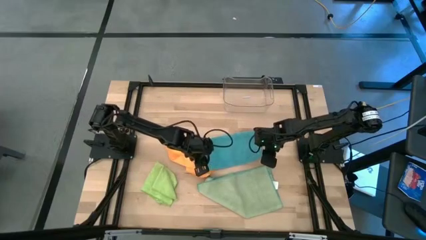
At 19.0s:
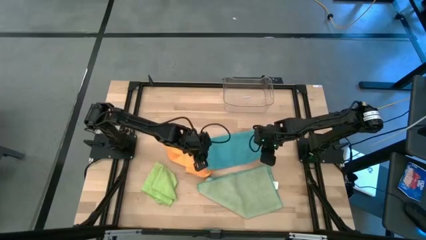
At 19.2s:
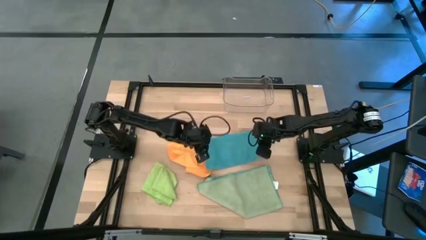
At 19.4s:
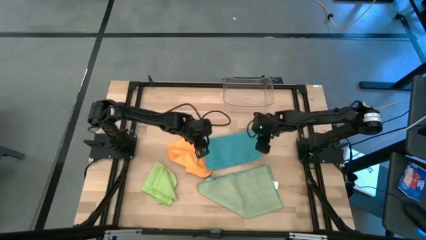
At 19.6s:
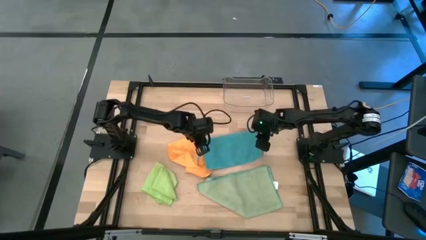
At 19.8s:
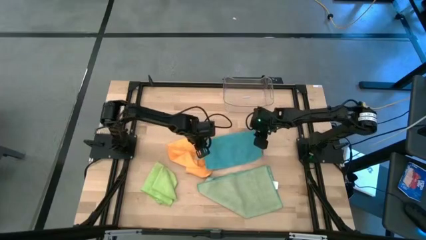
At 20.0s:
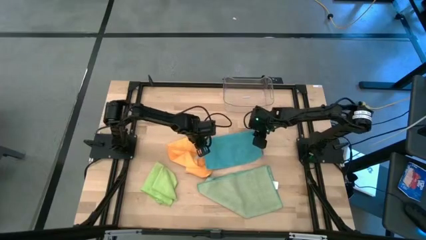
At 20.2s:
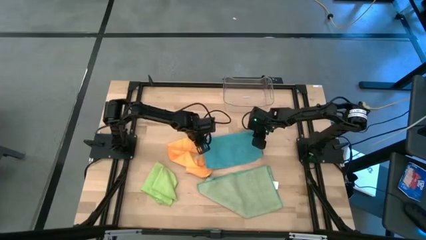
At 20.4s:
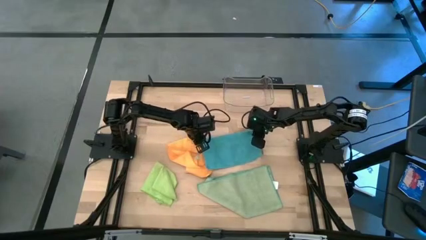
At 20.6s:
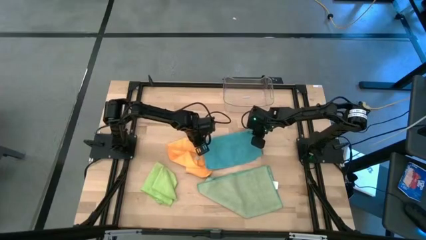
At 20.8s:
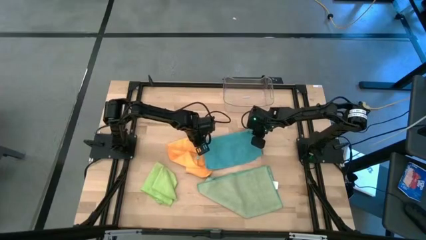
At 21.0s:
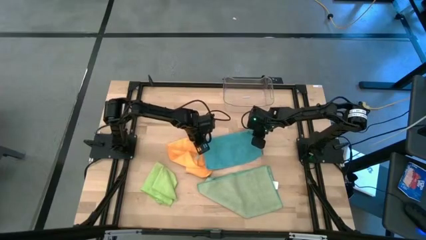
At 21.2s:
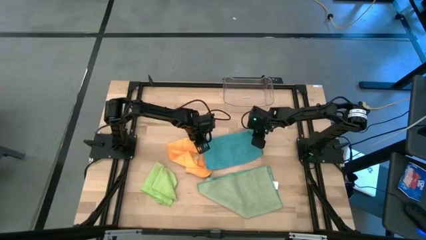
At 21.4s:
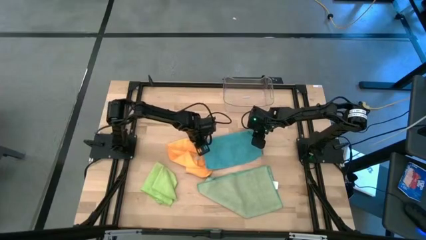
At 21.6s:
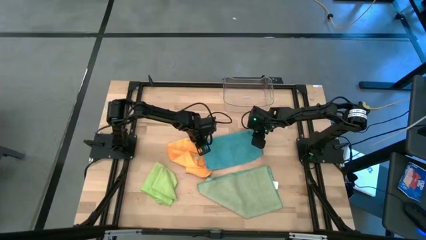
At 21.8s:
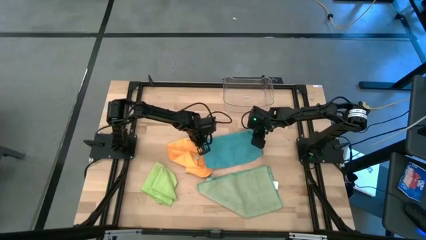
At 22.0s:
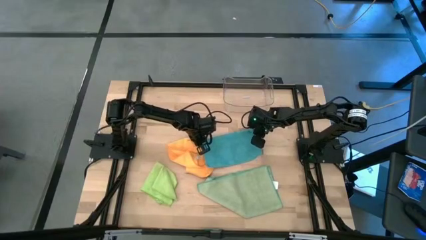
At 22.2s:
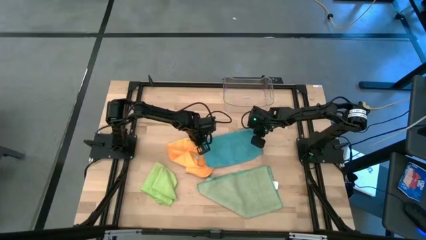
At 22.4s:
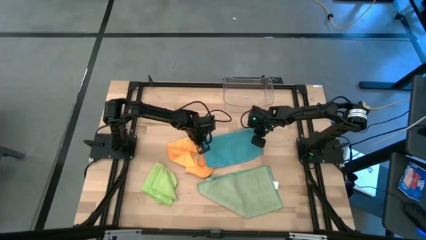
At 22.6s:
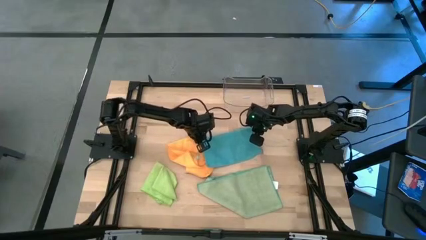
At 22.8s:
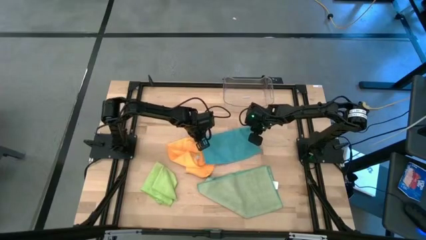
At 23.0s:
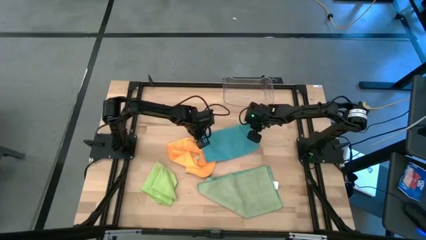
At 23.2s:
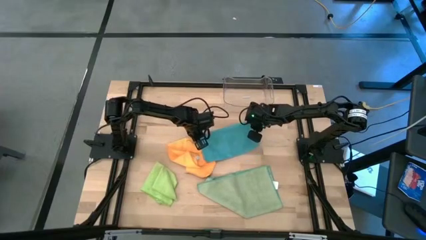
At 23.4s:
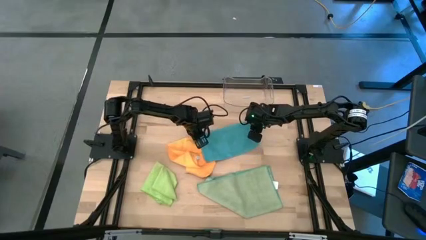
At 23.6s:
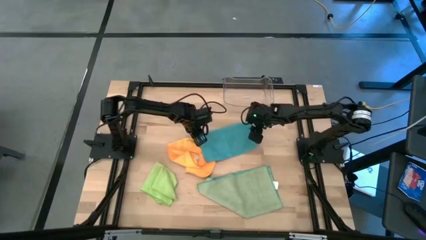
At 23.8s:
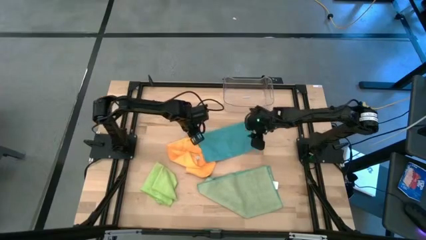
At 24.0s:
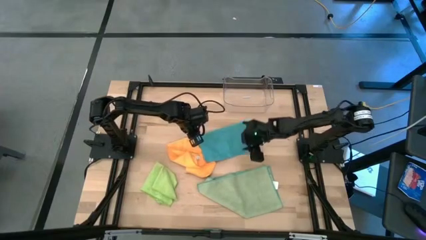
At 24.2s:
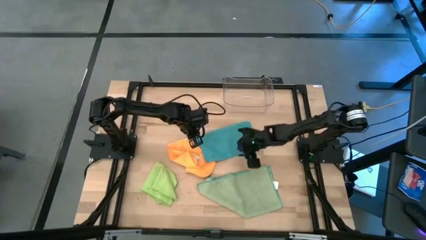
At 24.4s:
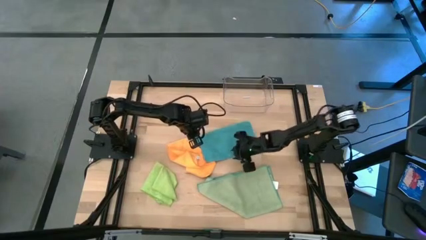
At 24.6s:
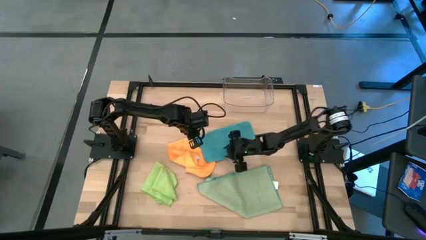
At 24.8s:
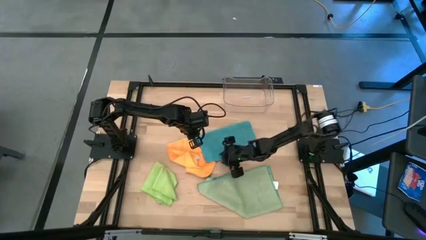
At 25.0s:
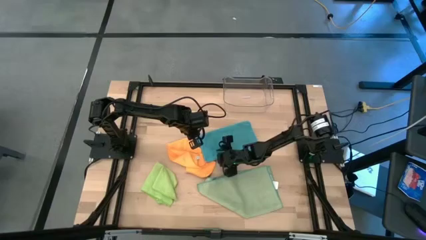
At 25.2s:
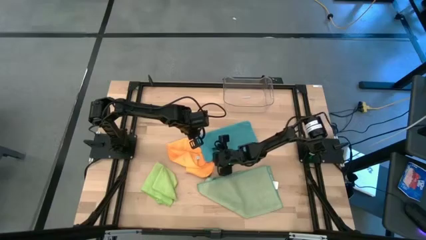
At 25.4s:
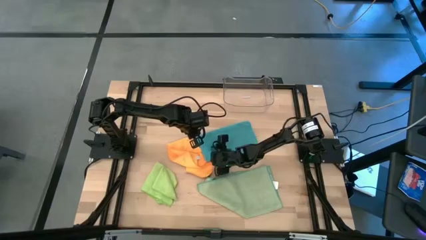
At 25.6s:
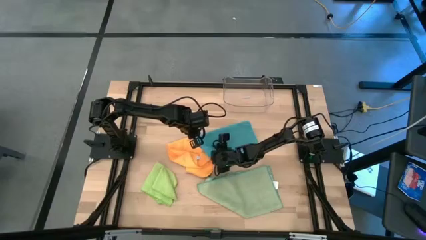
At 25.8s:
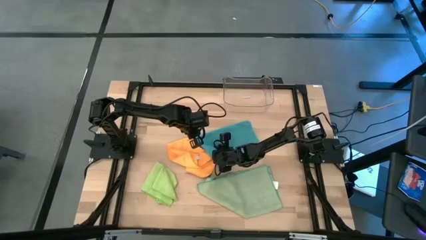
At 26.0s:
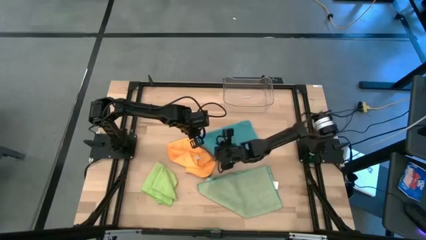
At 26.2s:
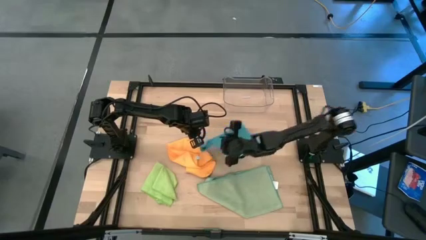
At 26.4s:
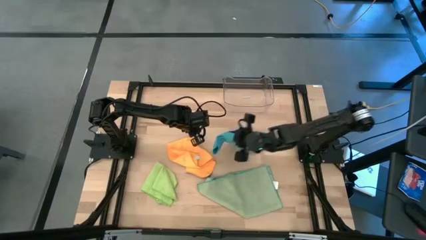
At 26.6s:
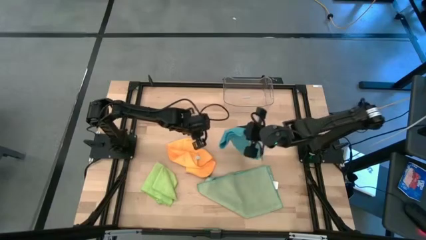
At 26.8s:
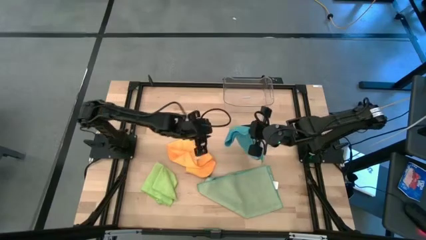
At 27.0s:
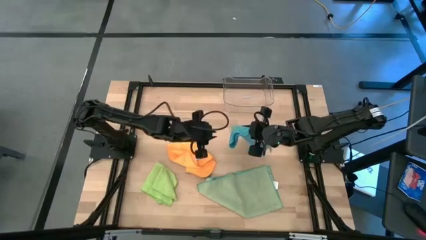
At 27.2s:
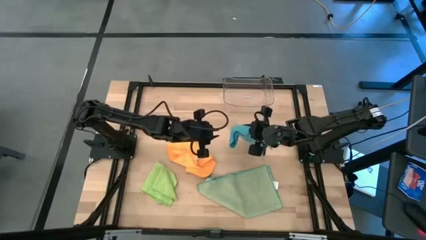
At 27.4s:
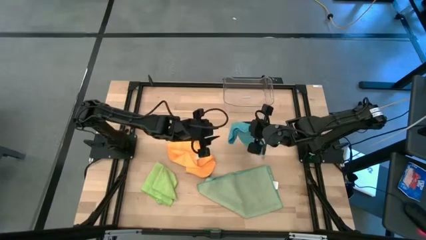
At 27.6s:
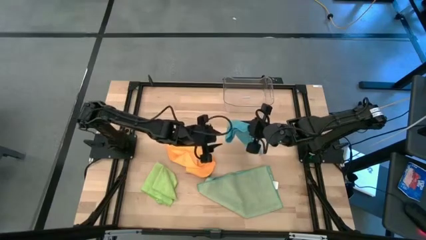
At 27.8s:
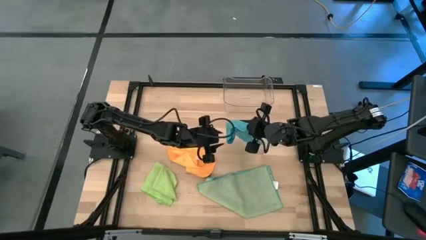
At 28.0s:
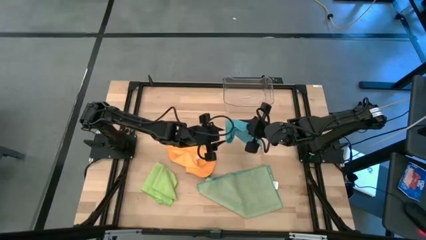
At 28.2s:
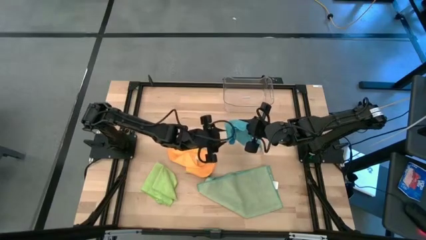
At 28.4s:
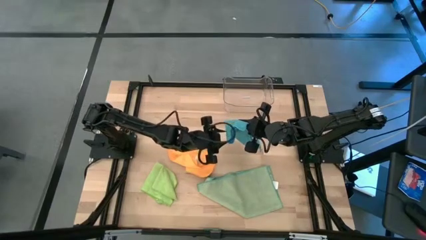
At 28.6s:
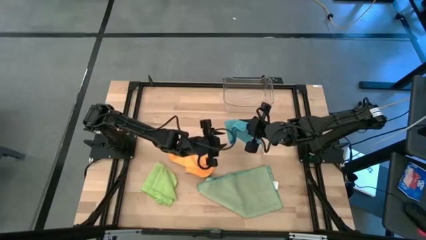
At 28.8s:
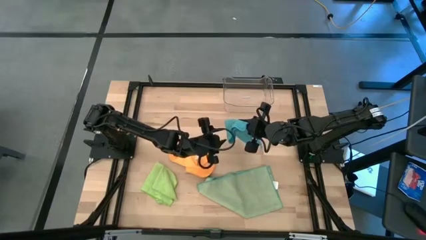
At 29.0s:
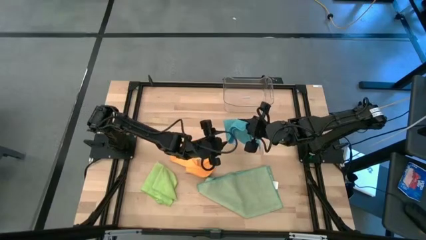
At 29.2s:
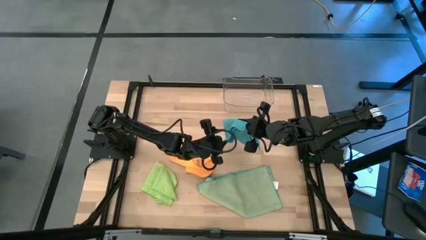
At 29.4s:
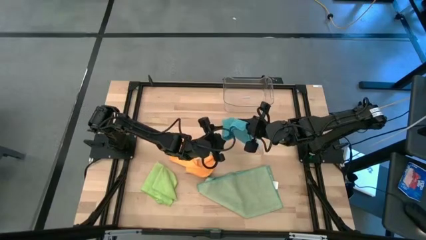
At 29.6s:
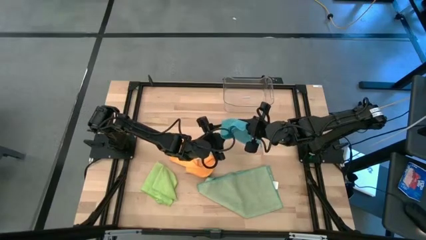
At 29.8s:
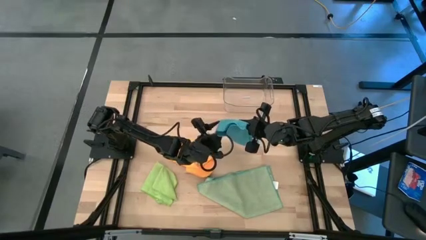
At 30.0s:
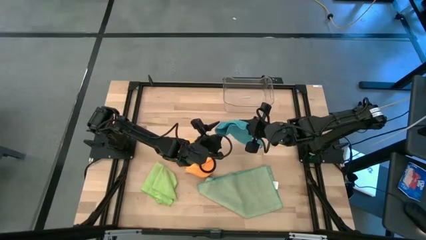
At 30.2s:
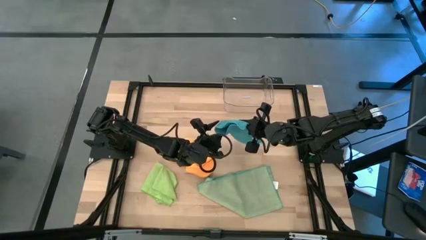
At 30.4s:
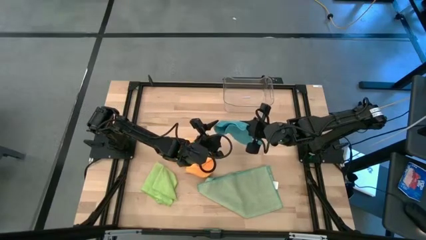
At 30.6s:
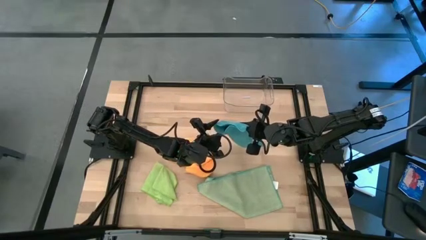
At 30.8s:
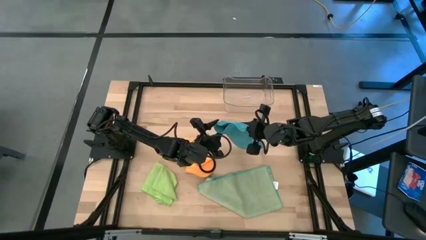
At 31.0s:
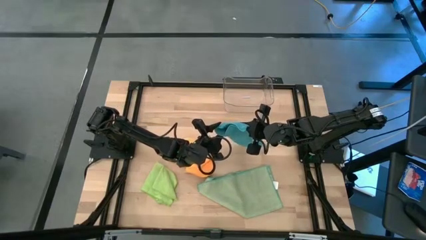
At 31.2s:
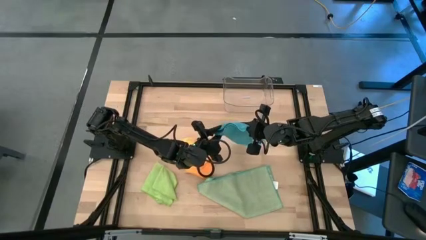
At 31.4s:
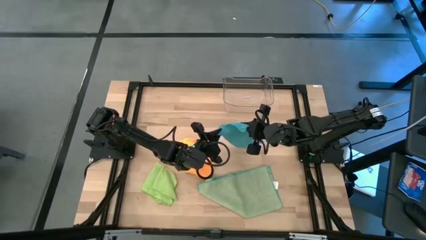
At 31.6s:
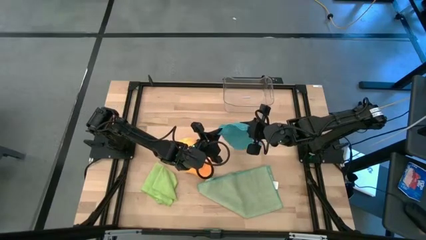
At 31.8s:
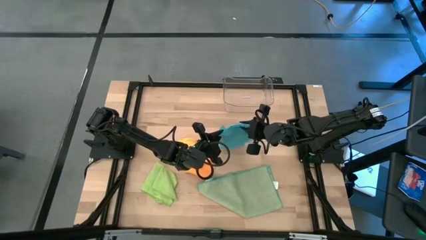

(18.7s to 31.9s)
Task: Fold microfiber towels
Fold the blue microfiber cloth
